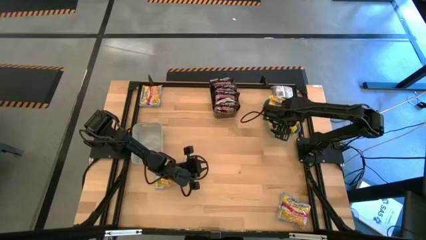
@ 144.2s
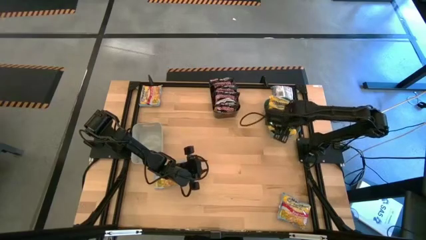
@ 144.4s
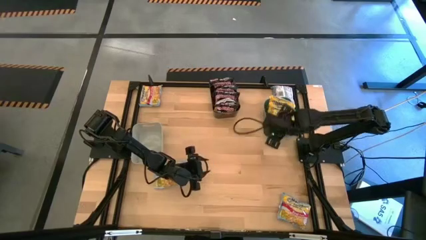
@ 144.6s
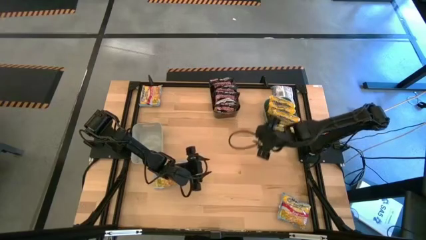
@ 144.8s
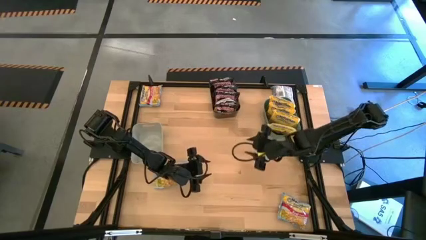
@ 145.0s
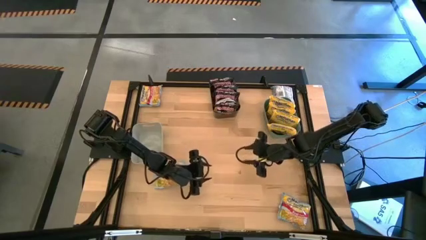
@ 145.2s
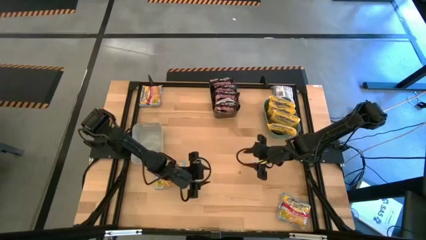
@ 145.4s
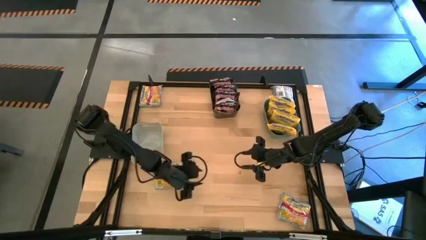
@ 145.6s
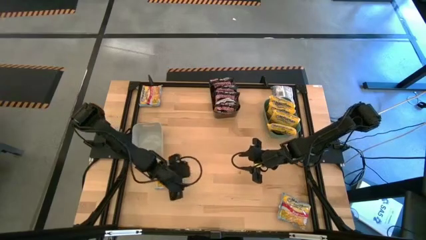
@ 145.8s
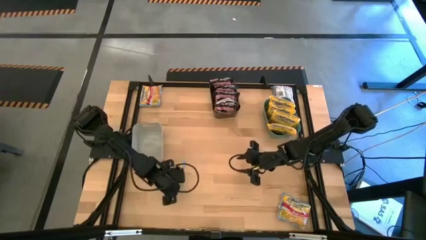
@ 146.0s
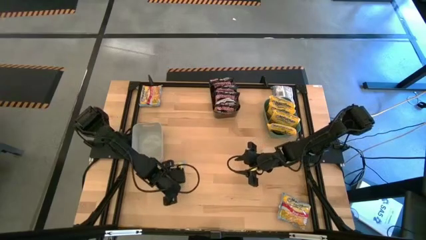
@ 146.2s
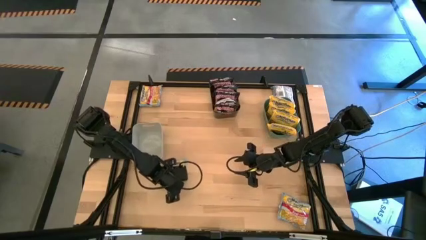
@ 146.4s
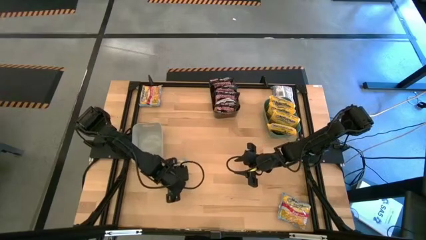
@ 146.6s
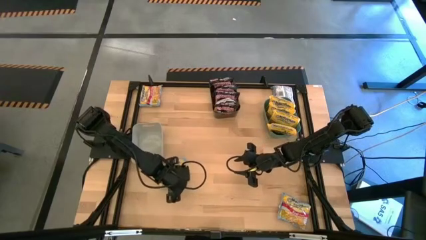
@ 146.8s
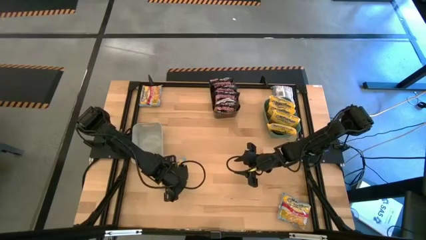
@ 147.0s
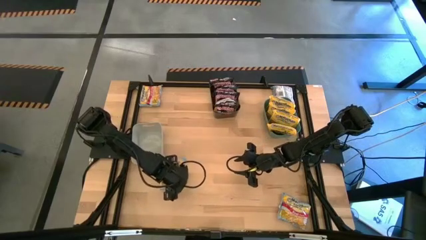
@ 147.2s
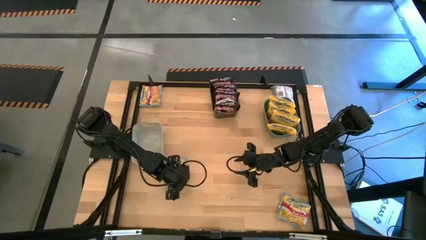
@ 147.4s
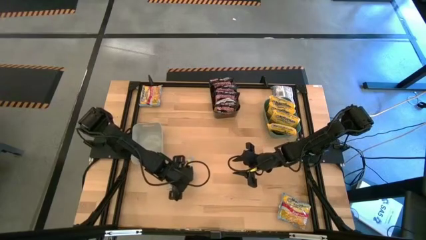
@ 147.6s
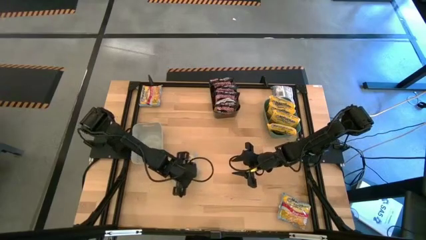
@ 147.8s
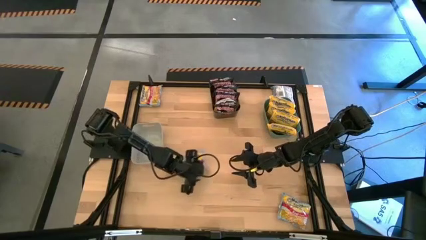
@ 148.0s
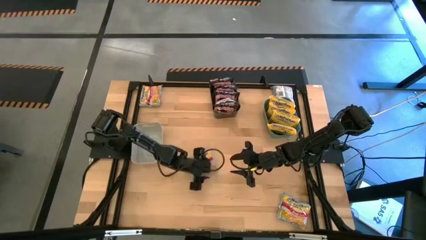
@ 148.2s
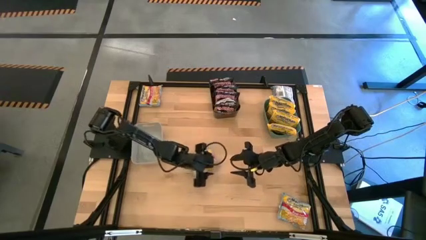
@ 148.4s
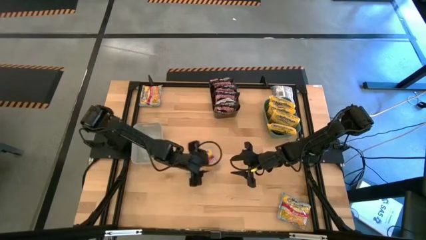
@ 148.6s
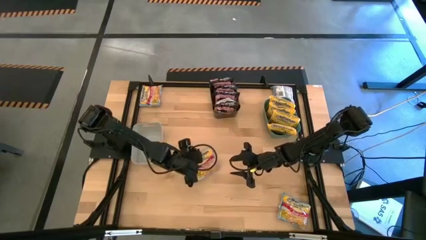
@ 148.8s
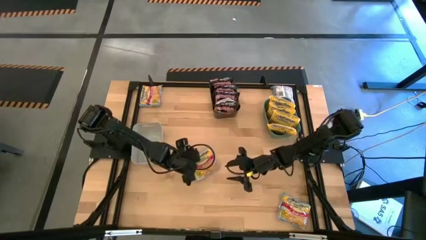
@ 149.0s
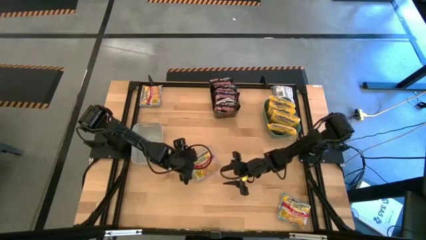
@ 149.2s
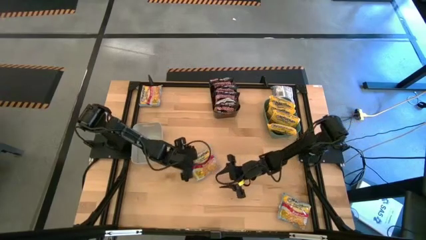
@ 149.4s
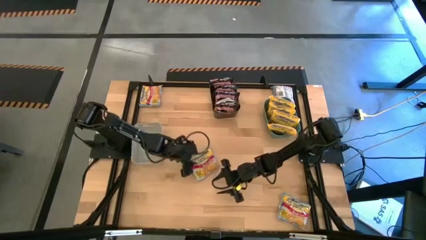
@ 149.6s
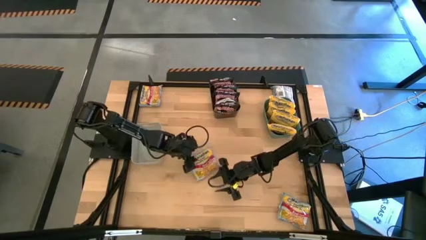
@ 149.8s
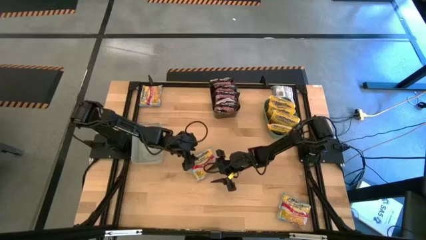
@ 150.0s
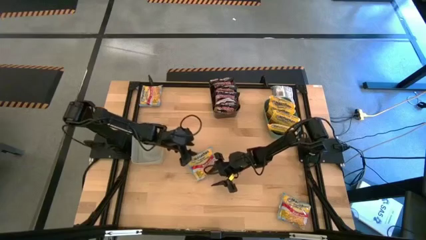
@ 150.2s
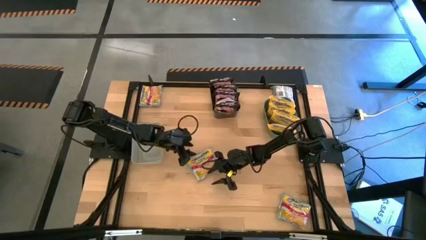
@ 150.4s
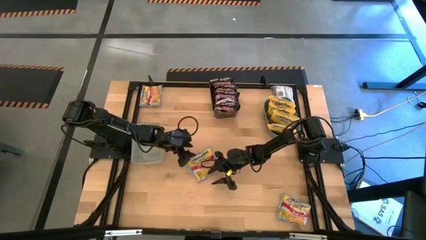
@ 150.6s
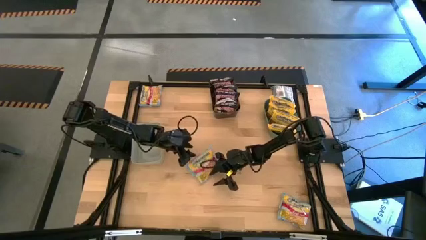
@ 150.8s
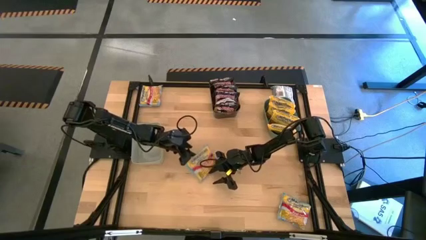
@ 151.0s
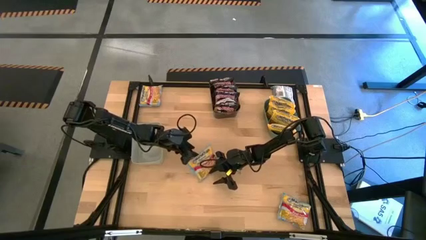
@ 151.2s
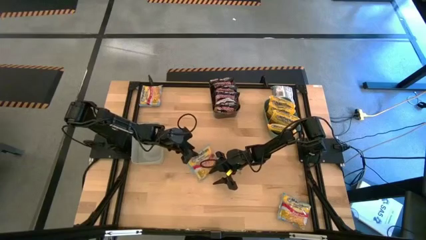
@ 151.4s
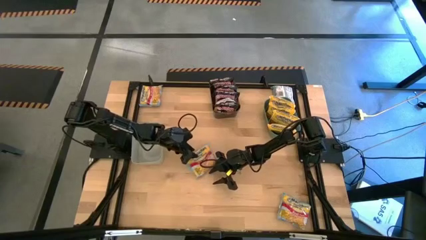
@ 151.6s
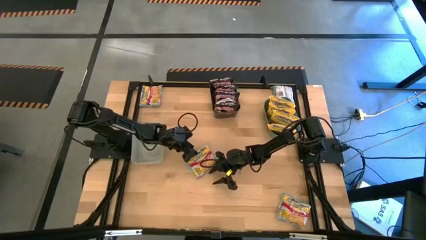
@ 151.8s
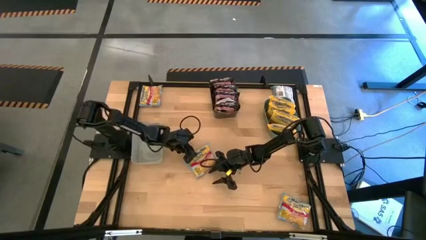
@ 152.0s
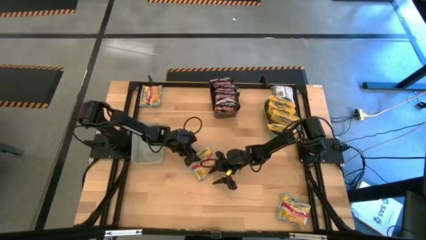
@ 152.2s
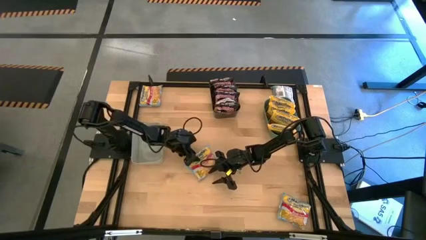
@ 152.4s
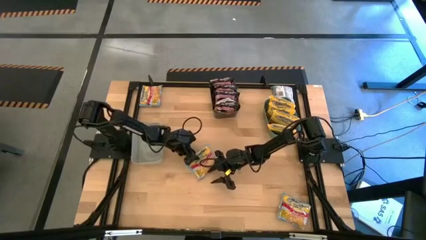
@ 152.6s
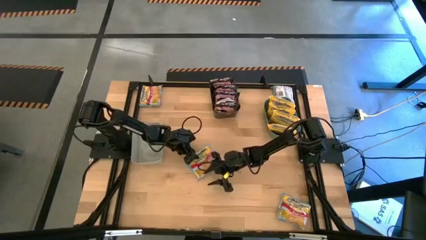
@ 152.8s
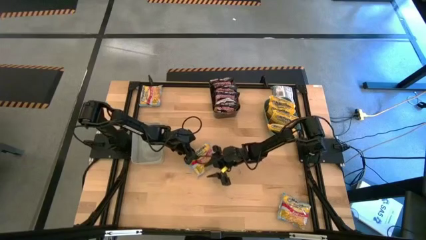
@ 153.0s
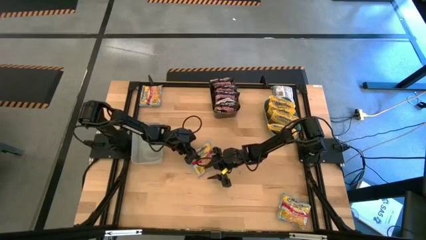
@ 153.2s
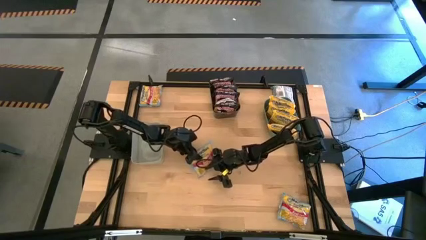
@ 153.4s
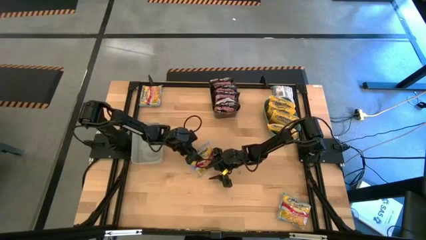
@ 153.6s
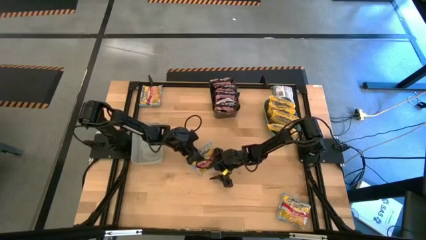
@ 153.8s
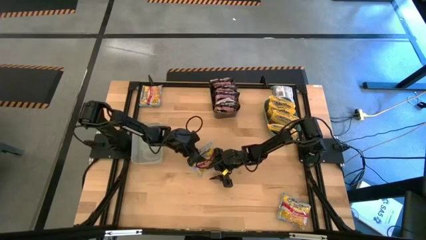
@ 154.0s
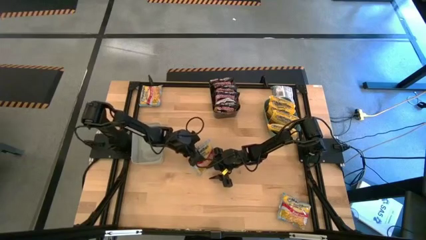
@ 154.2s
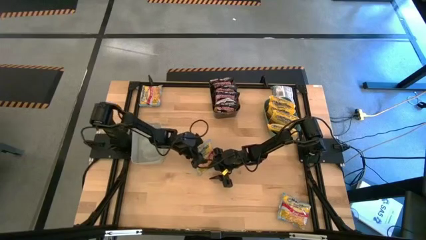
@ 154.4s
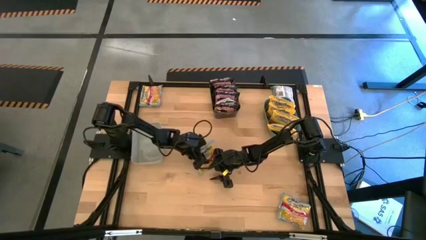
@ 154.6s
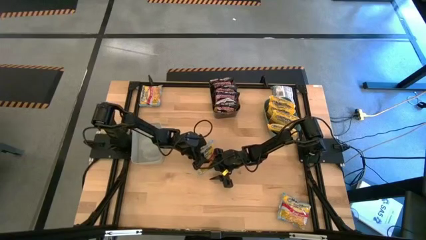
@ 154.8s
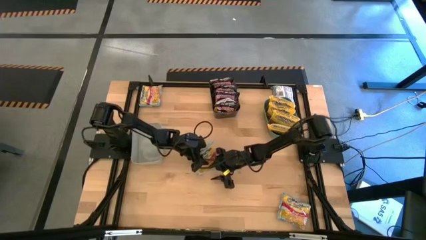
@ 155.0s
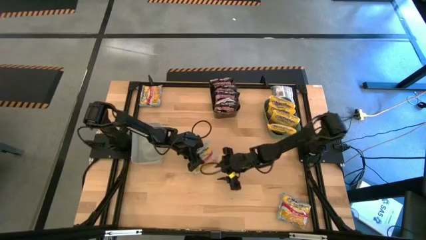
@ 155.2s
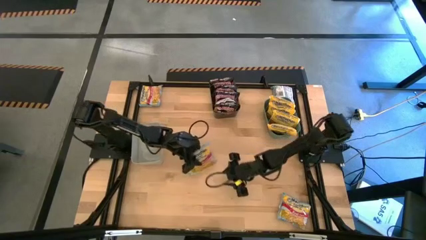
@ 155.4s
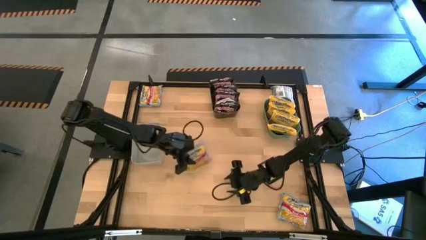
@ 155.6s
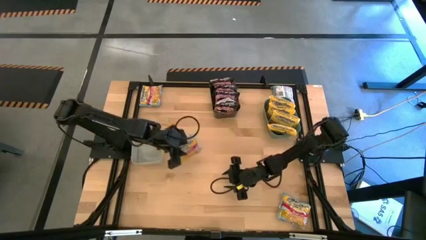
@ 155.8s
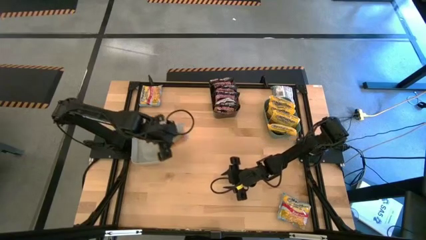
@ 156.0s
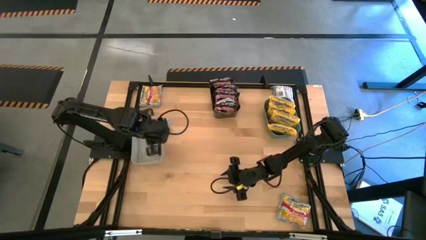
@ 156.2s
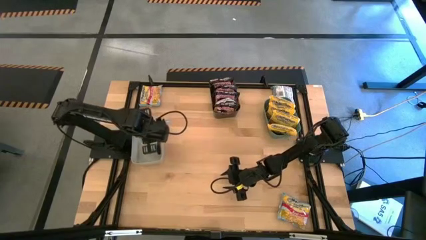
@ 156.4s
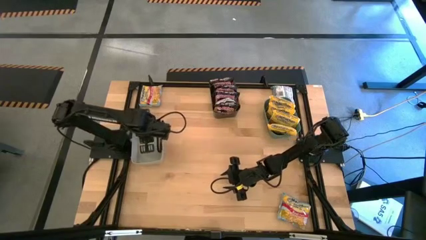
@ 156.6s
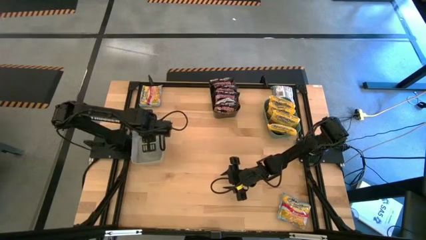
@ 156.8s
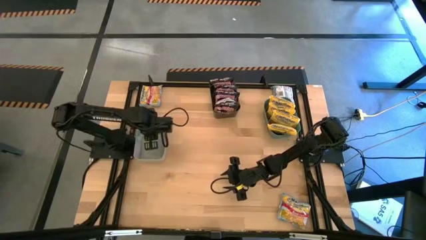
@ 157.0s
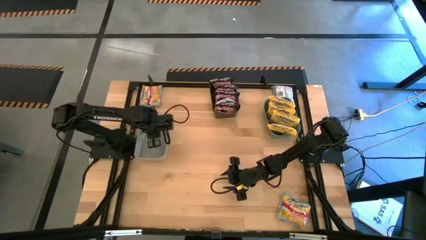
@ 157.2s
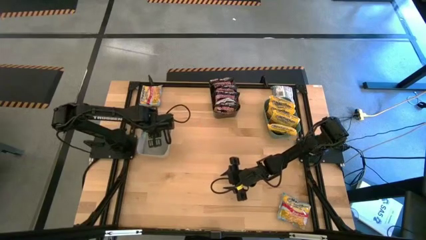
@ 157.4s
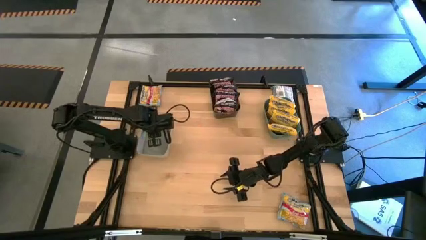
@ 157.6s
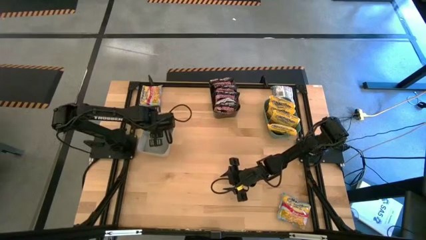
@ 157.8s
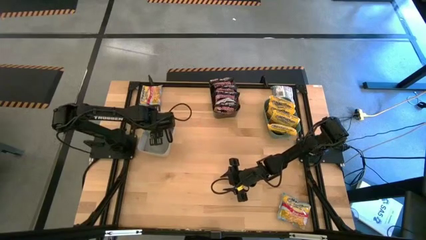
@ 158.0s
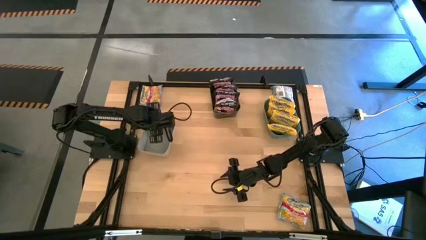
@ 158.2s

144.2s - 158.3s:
Task: Sort Maruchan noodles
Put the left blue noodle pack into the gray bin
